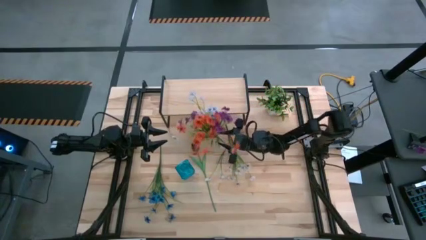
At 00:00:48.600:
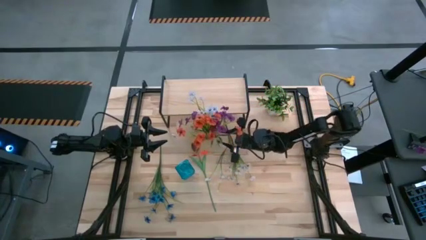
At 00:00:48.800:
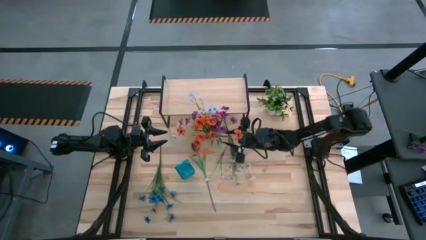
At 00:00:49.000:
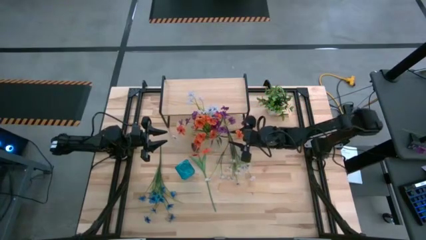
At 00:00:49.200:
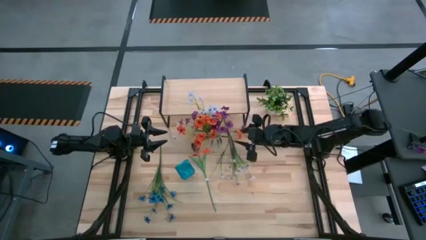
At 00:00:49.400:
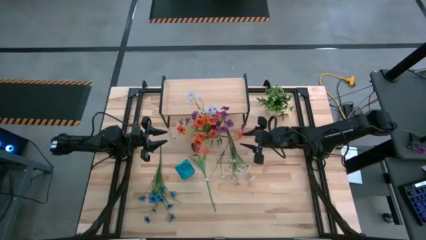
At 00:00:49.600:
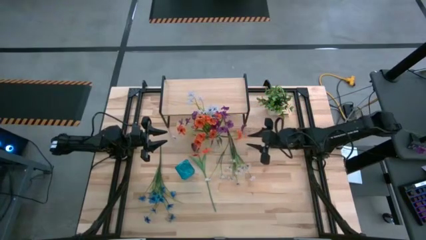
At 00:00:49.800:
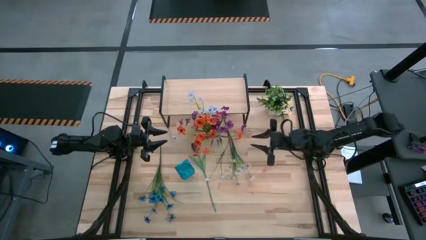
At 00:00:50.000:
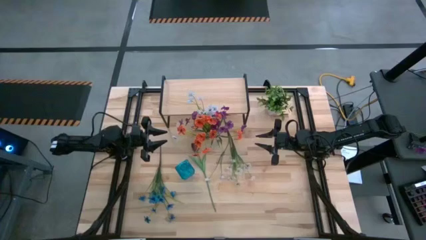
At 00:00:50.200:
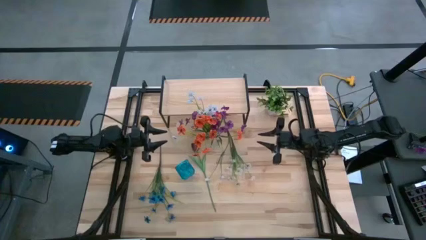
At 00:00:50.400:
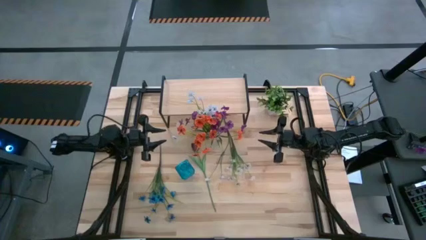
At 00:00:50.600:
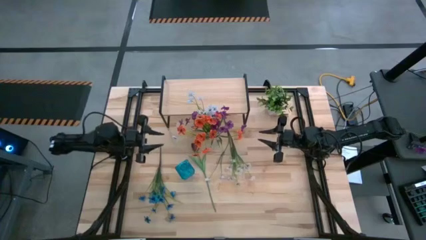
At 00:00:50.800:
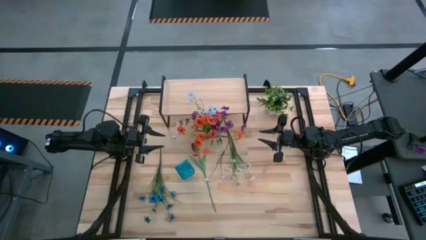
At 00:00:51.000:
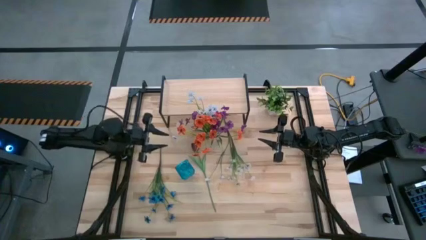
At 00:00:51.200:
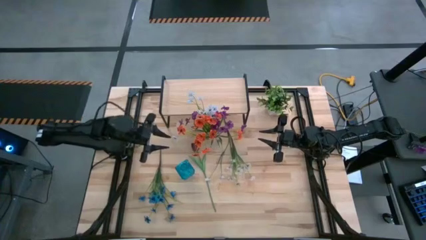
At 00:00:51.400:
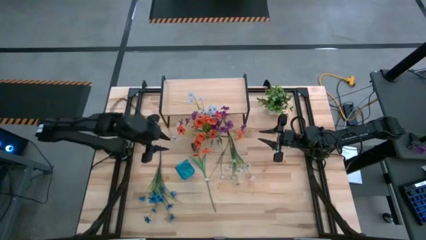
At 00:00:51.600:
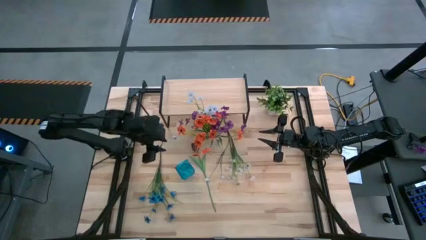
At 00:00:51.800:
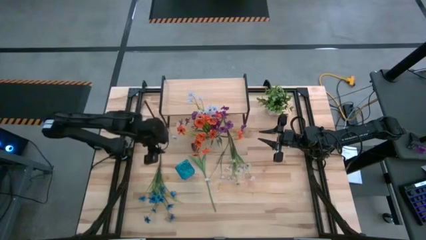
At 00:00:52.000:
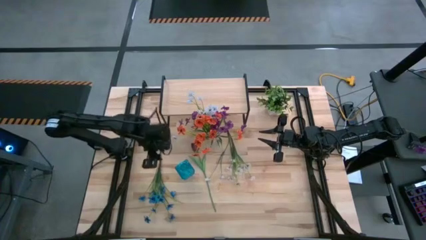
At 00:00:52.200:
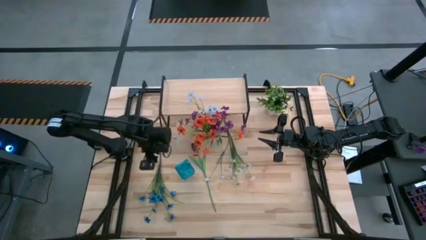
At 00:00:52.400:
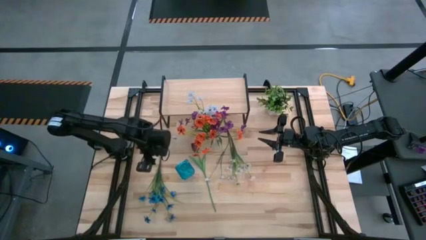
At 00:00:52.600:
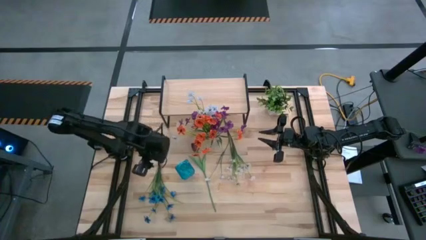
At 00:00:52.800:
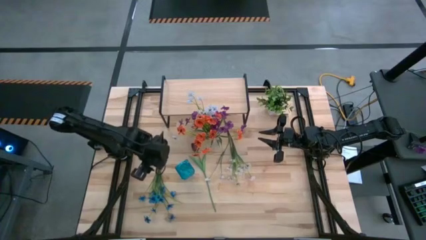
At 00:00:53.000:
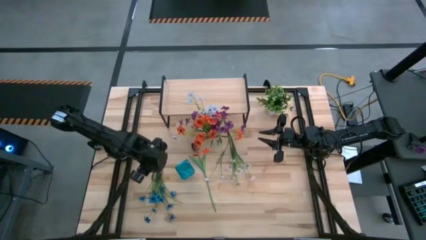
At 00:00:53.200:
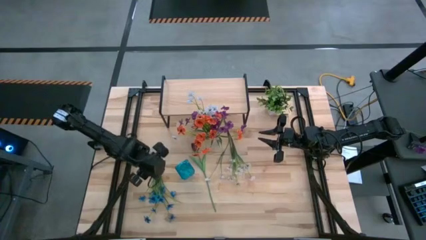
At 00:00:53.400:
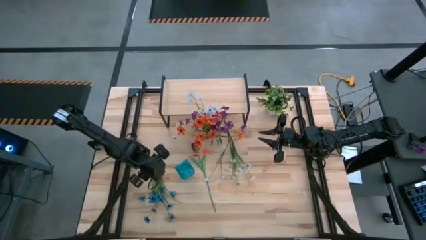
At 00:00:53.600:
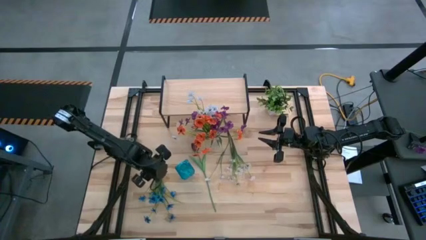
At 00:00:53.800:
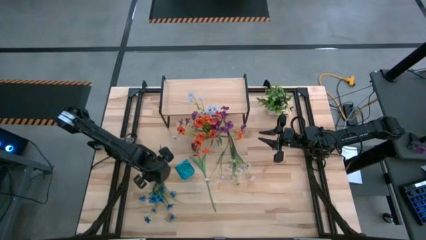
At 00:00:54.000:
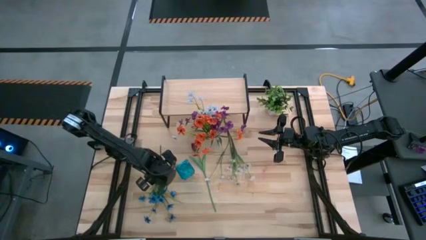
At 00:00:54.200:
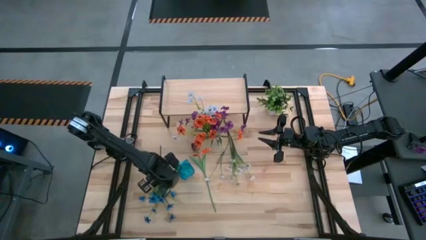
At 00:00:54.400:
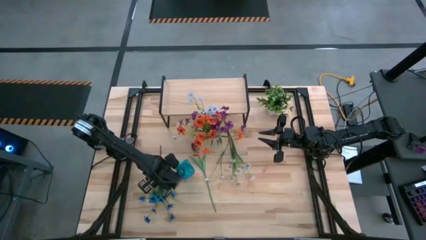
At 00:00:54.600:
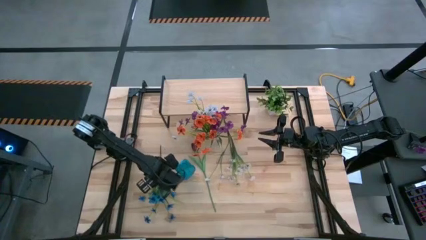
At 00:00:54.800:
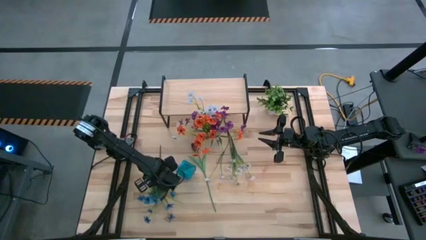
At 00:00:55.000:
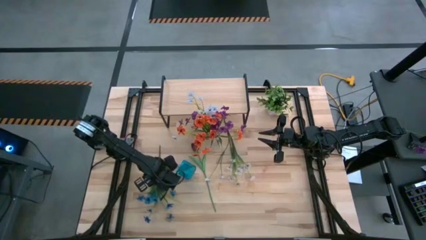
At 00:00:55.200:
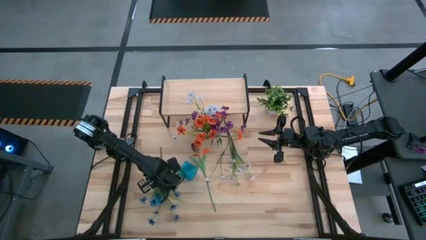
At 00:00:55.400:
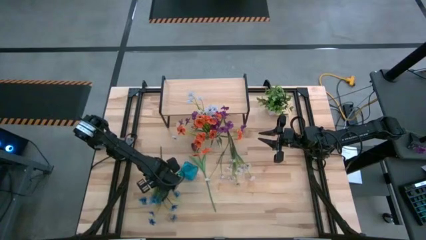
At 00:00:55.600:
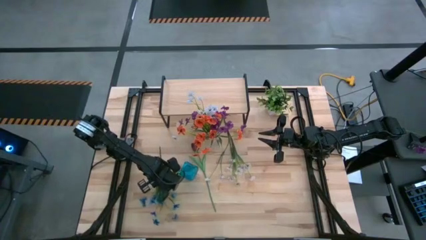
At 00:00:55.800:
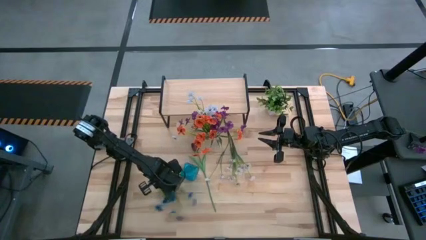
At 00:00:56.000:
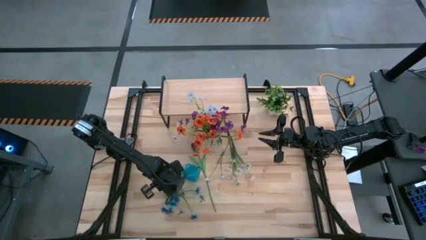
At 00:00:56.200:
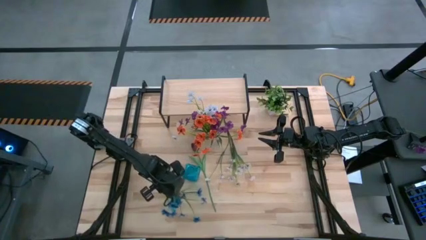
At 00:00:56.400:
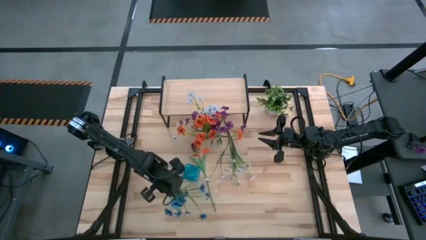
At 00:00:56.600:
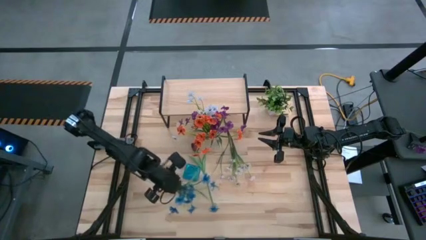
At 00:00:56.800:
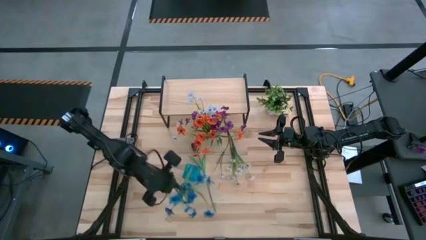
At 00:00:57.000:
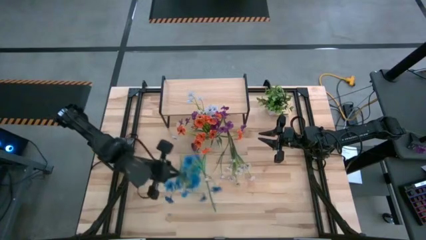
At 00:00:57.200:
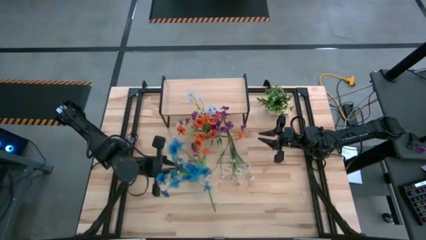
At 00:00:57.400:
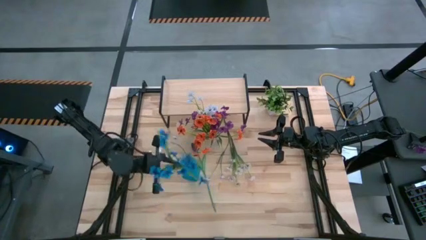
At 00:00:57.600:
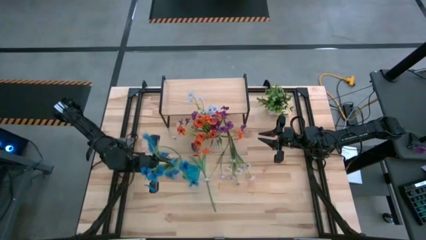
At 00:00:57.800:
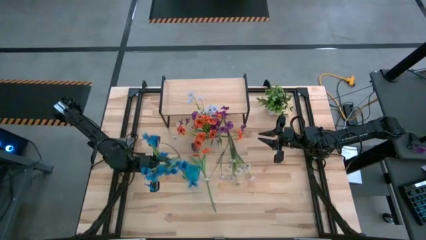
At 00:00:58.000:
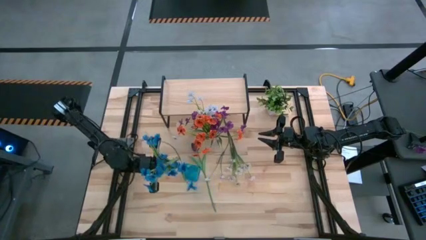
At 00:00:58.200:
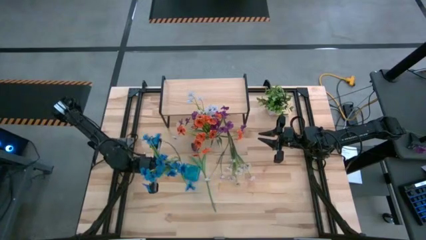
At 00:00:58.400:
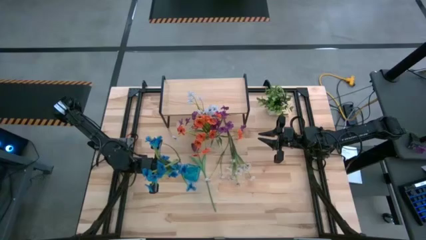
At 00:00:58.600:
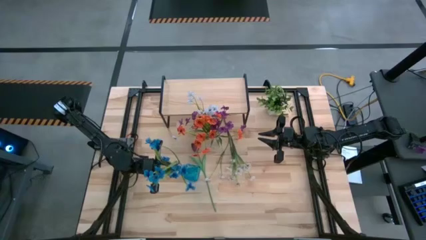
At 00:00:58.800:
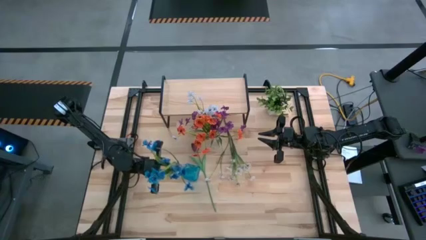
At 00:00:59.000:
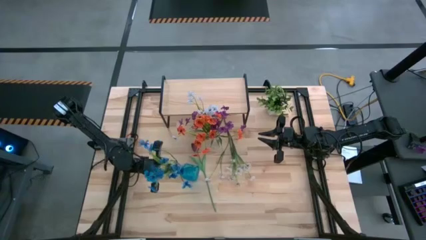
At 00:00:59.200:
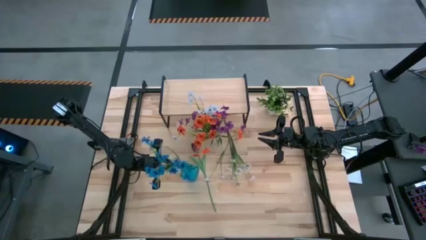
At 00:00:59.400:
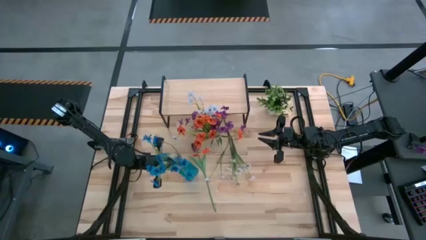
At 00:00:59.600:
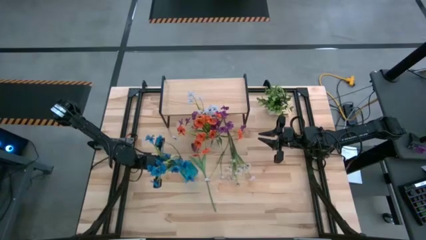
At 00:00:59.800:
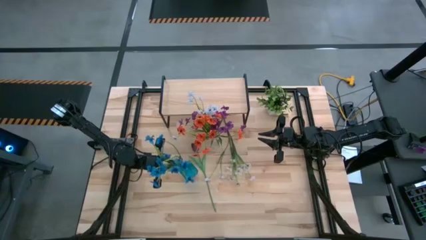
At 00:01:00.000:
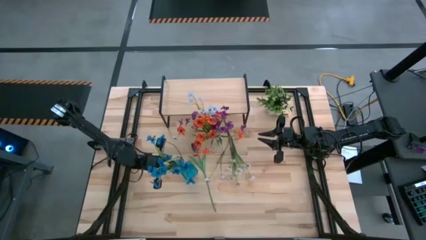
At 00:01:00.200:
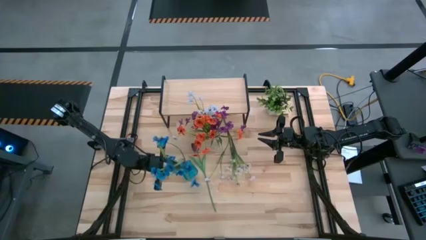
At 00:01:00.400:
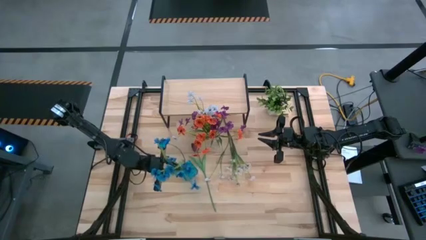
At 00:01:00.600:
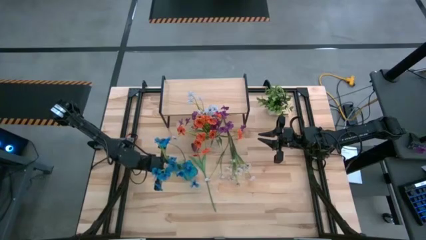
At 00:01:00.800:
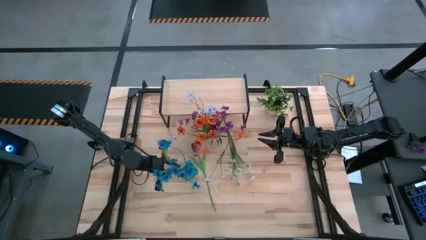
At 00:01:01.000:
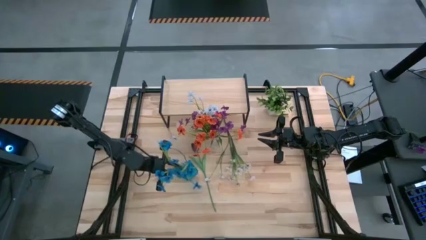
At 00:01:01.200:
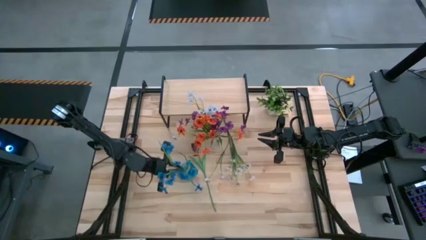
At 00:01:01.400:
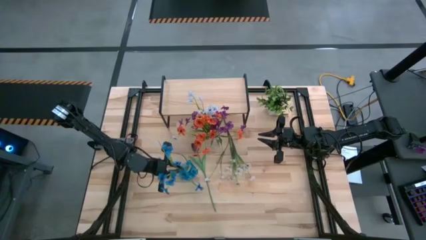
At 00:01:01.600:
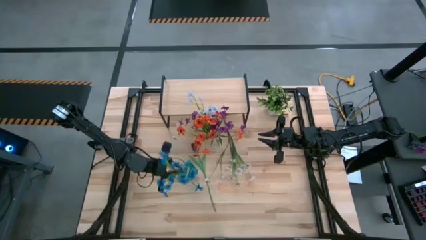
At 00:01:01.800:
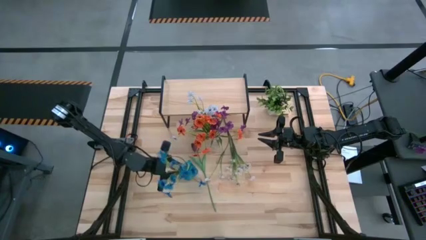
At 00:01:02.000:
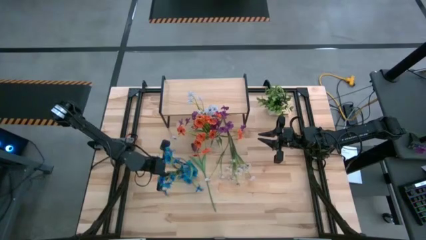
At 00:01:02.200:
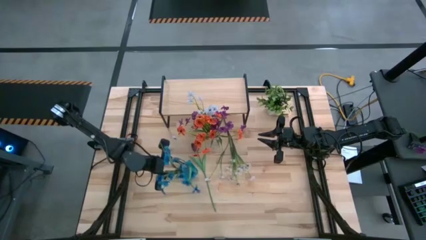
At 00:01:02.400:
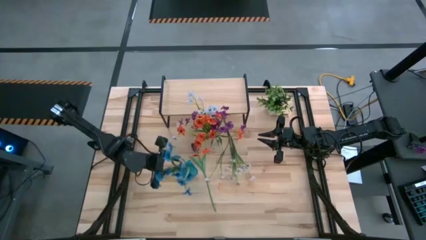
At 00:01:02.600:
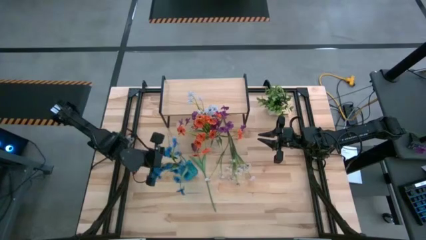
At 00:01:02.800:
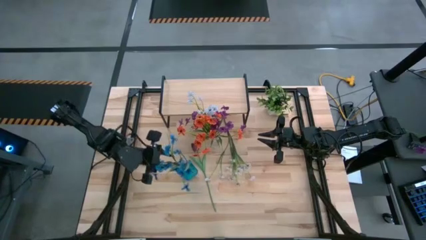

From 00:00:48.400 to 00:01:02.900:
Task: Pick and place flowers into a vace then onto a shelf
Put the blue flowers into the blue vase
